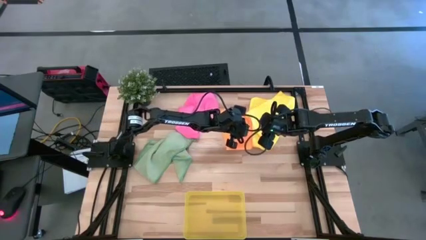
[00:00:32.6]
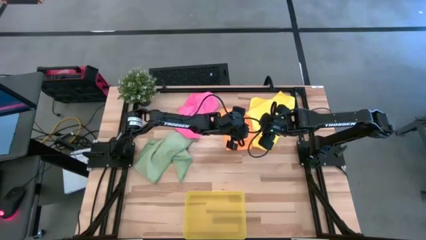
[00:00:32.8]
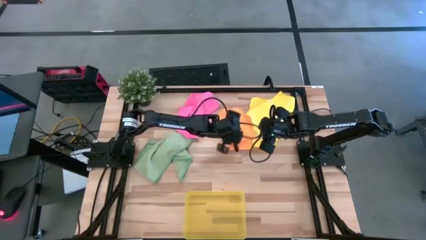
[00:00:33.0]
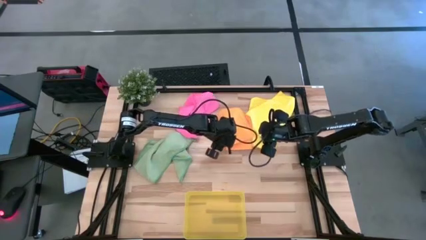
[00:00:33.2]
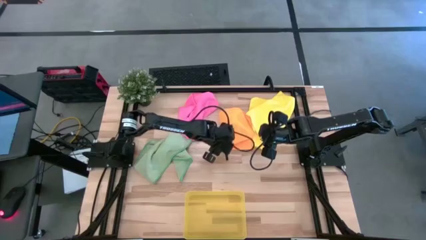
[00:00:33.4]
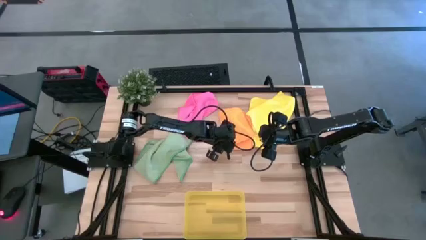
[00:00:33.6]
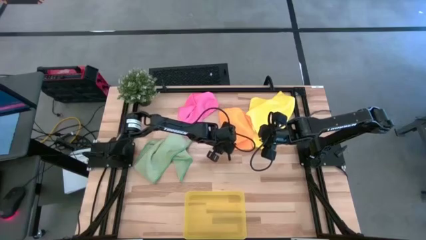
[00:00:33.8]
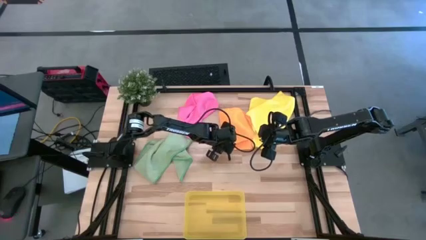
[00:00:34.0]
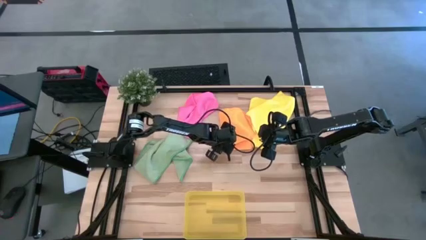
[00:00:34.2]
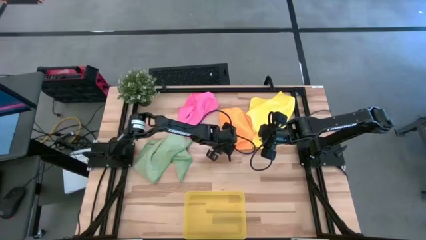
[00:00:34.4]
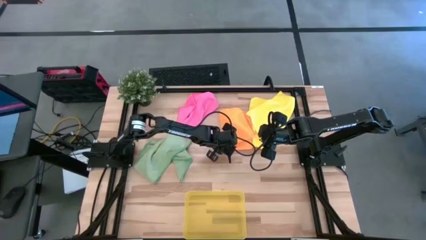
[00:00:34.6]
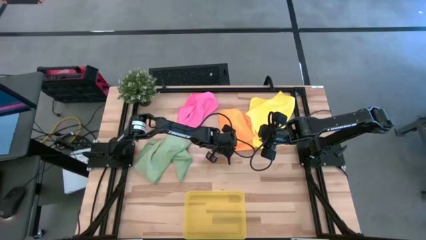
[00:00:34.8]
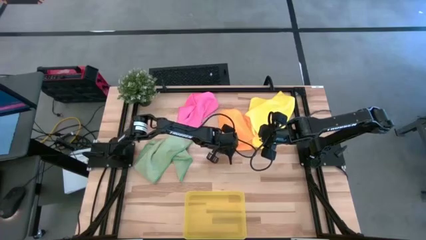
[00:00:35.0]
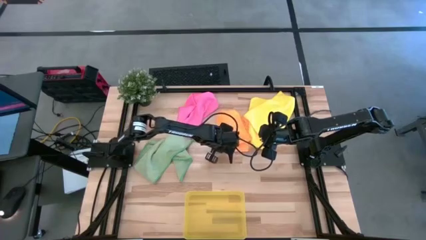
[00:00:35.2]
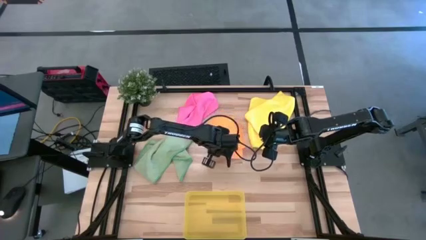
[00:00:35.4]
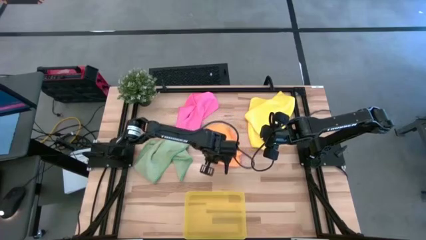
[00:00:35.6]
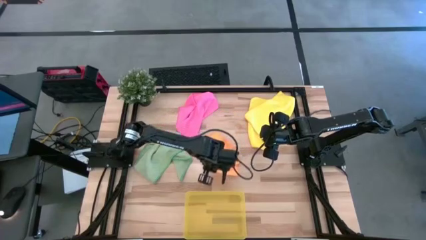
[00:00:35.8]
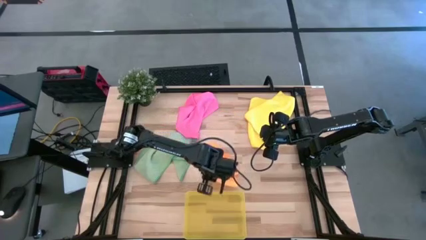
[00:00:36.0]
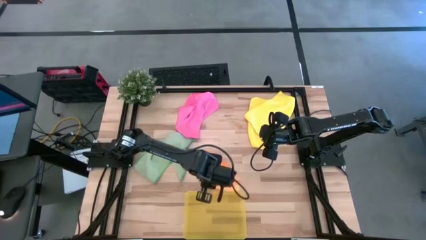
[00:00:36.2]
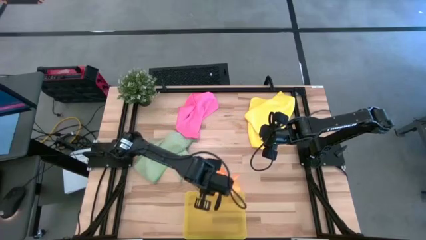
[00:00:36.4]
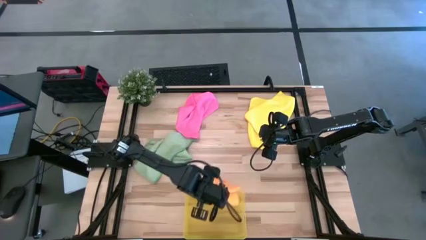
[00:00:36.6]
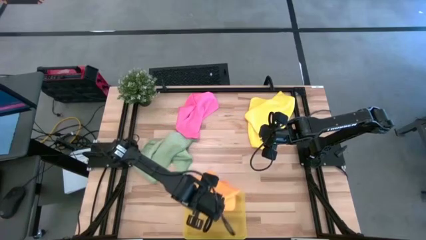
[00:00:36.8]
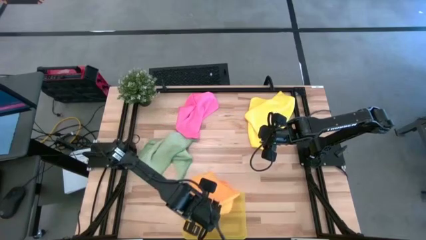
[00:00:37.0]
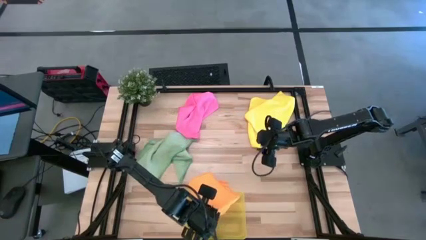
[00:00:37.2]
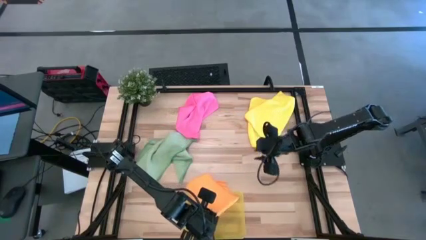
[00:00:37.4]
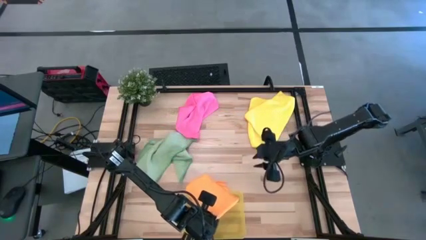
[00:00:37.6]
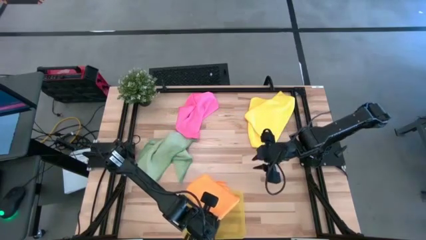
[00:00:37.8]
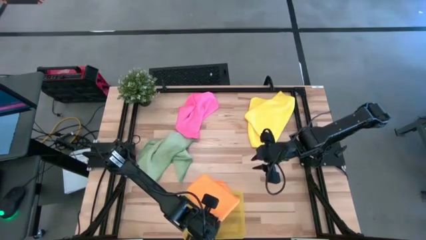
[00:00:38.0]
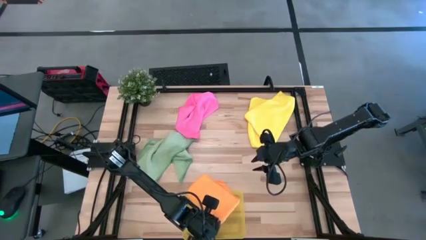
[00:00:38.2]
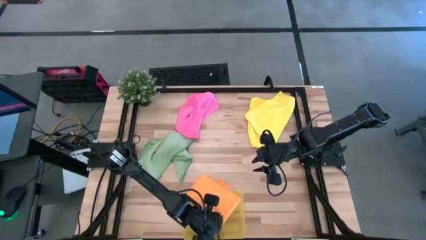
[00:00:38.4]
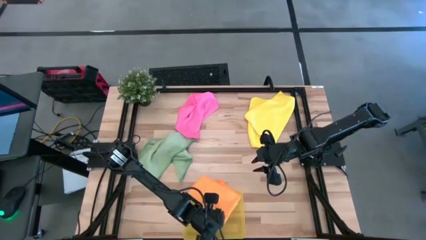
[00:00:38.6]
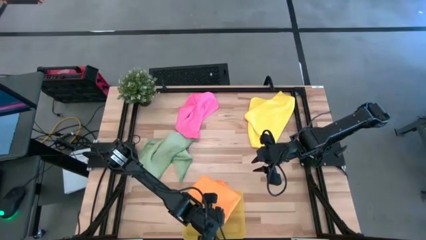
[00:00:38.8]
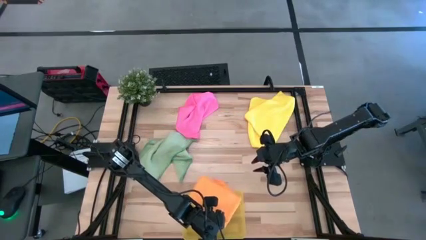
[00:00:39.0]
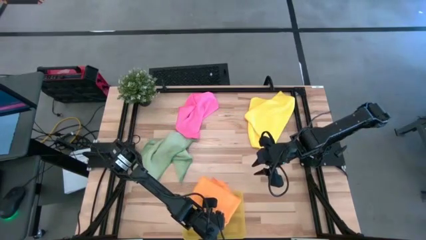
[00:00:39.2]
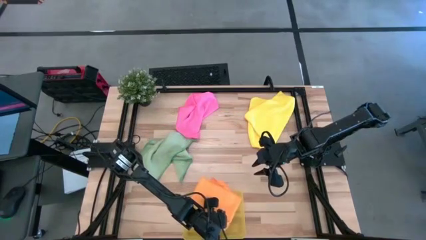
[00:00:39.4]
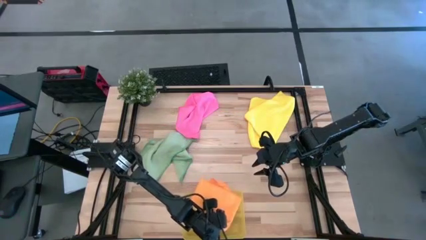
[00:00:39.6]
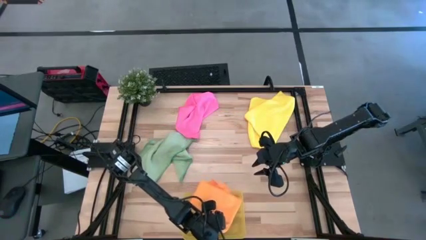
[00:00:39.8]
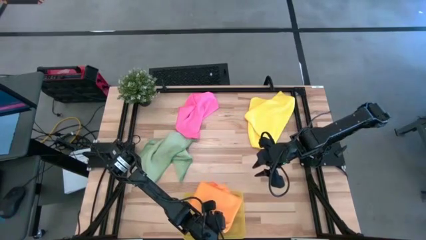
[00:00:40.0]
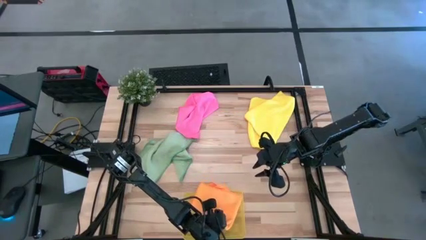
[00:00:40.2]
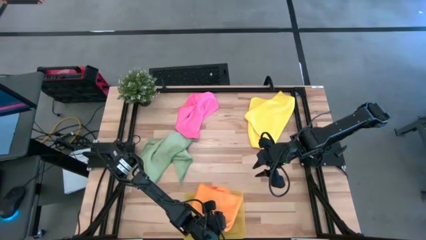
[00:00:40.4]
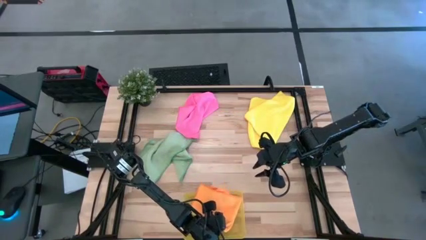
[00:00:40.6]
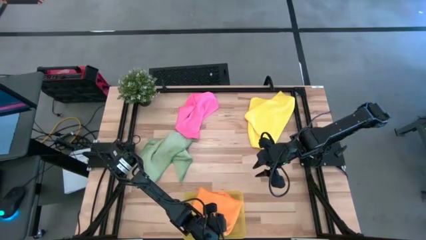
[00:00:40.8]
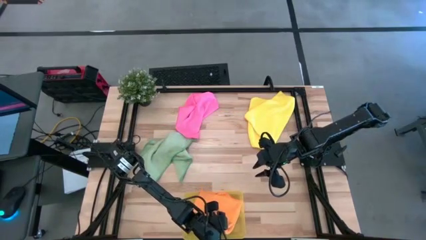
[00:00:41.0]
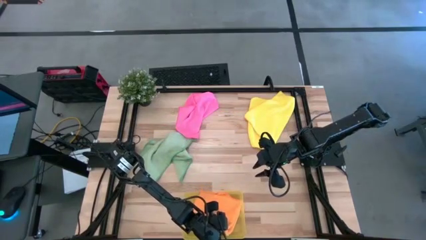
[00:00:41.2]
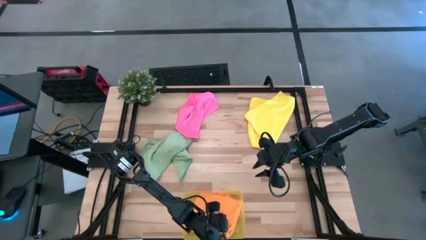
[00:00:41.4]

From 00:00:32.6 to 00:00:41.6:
Task: Fold microfiber towels
Put the orange microfiber cloth into the yellow bin

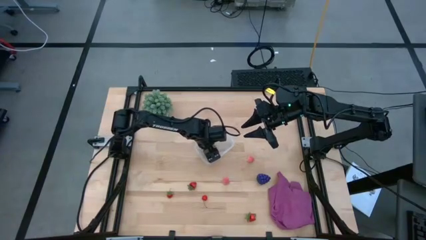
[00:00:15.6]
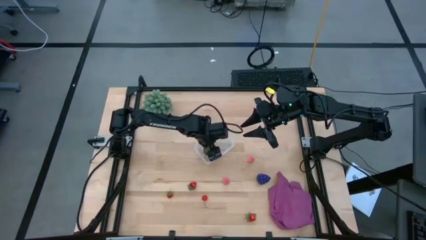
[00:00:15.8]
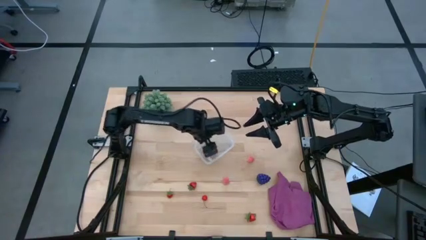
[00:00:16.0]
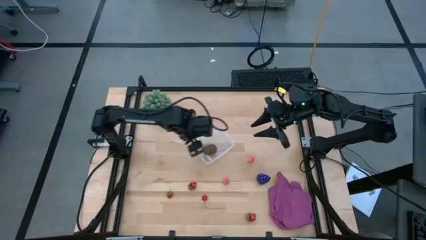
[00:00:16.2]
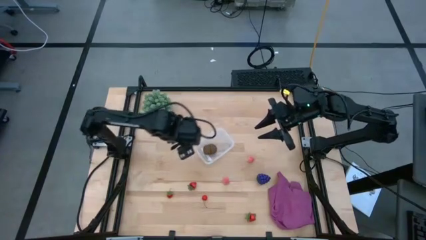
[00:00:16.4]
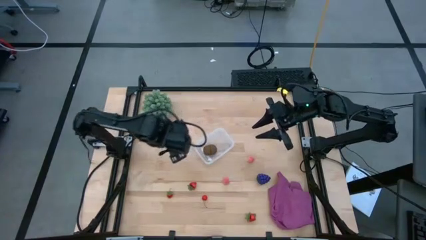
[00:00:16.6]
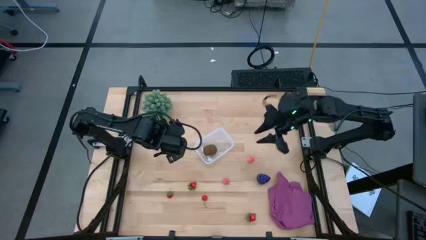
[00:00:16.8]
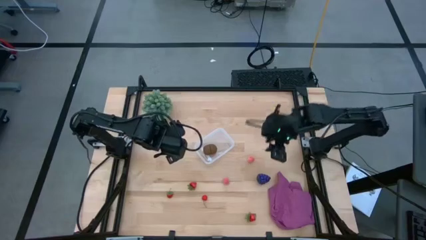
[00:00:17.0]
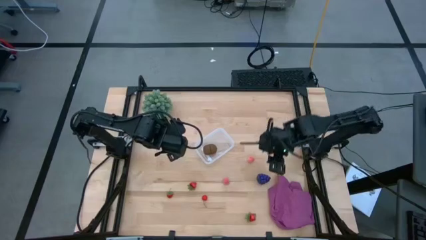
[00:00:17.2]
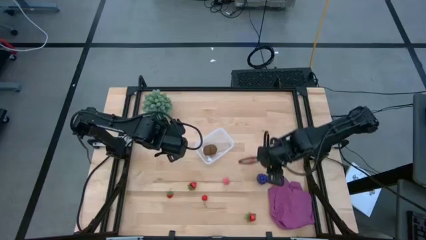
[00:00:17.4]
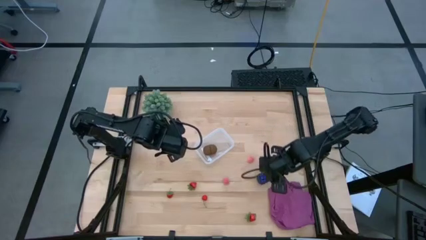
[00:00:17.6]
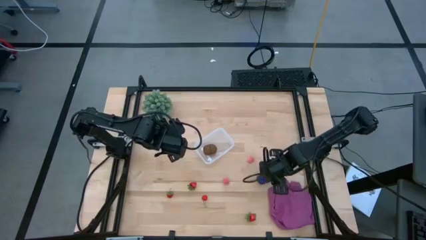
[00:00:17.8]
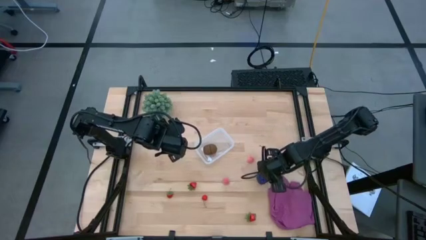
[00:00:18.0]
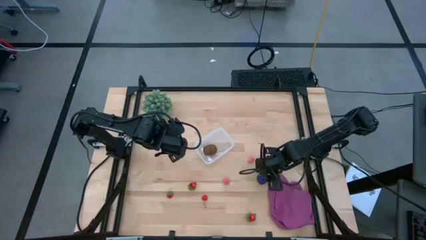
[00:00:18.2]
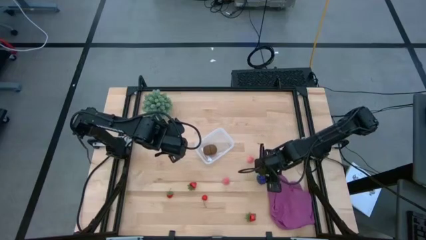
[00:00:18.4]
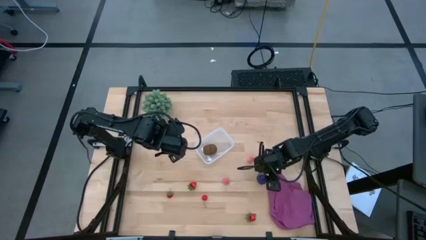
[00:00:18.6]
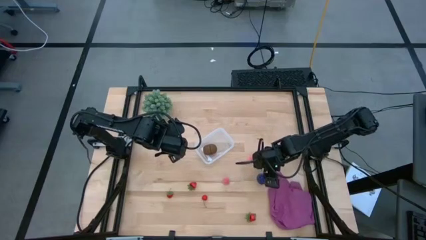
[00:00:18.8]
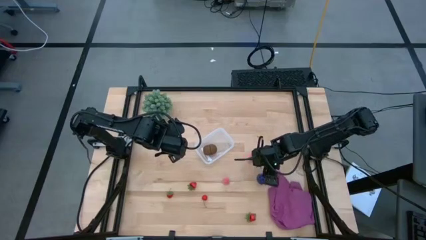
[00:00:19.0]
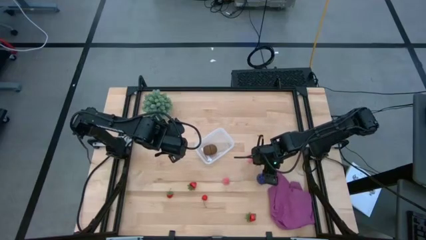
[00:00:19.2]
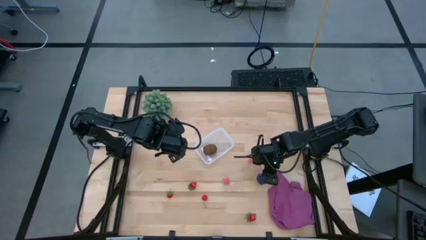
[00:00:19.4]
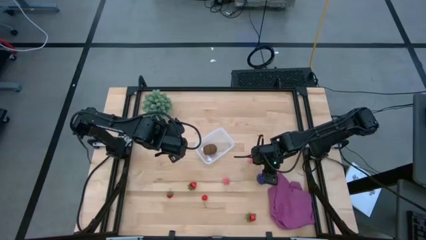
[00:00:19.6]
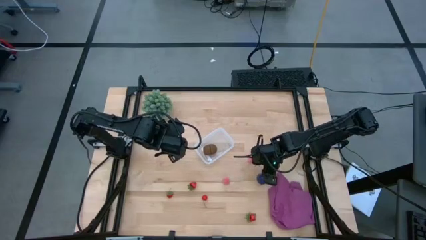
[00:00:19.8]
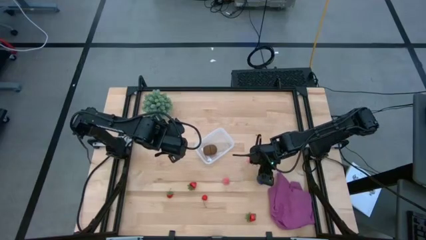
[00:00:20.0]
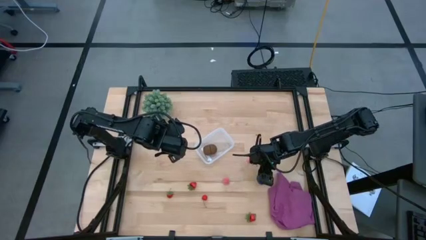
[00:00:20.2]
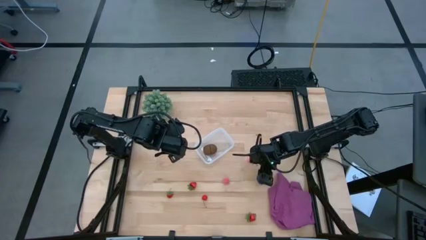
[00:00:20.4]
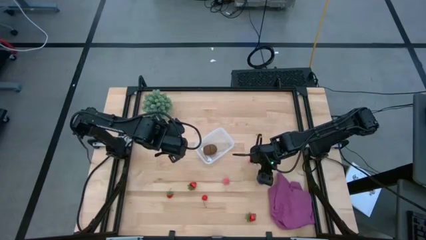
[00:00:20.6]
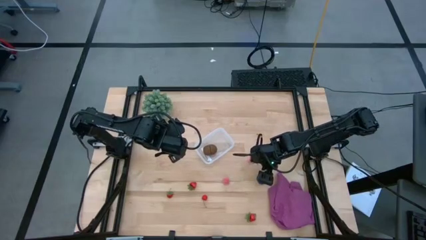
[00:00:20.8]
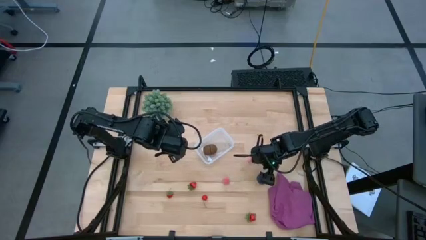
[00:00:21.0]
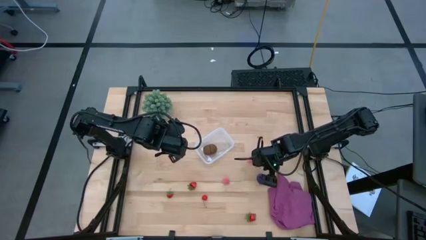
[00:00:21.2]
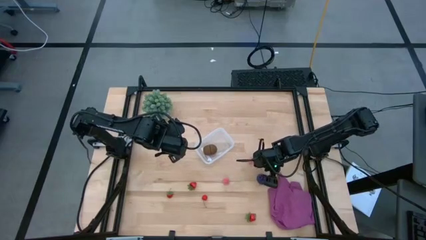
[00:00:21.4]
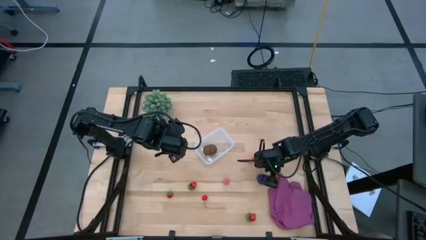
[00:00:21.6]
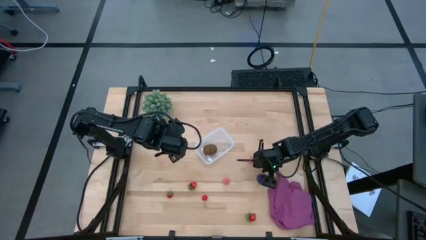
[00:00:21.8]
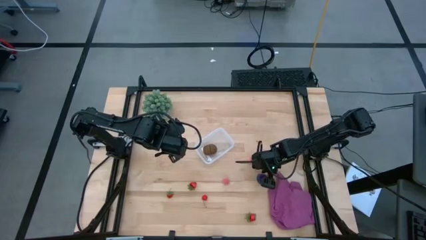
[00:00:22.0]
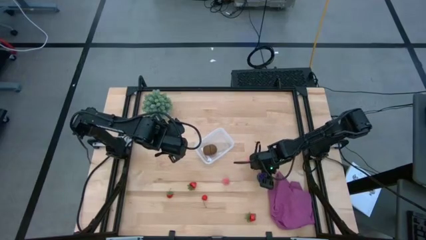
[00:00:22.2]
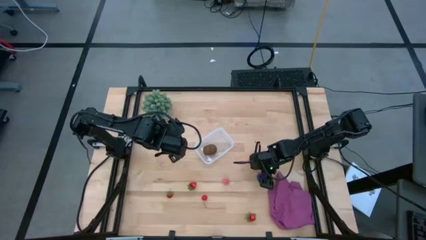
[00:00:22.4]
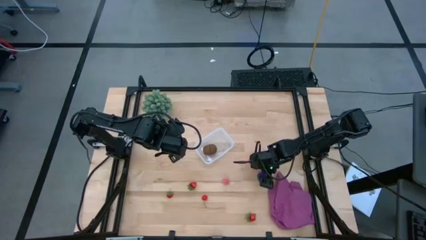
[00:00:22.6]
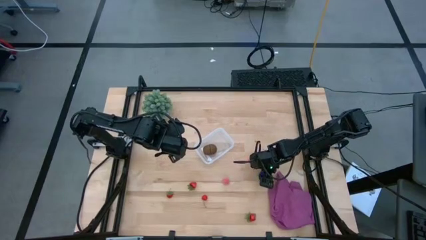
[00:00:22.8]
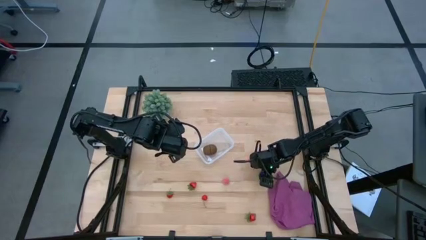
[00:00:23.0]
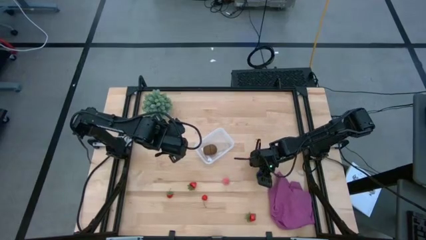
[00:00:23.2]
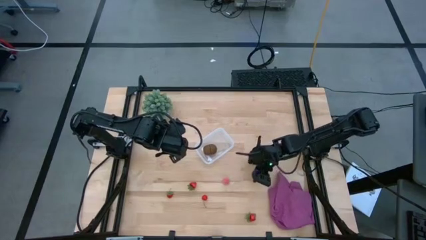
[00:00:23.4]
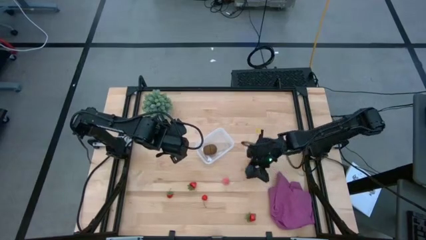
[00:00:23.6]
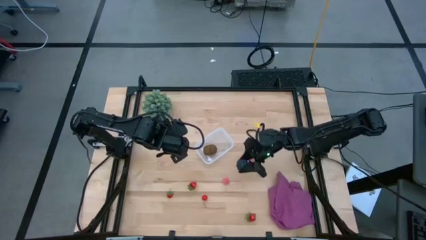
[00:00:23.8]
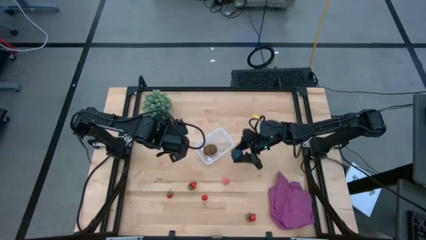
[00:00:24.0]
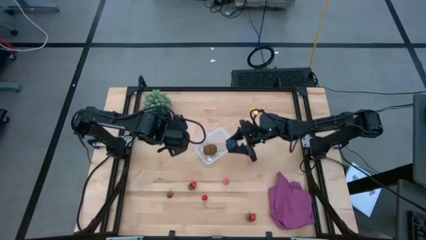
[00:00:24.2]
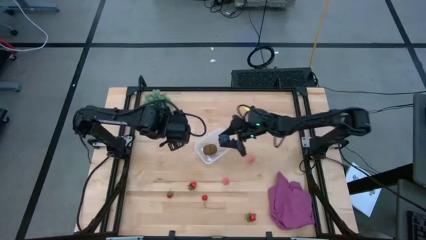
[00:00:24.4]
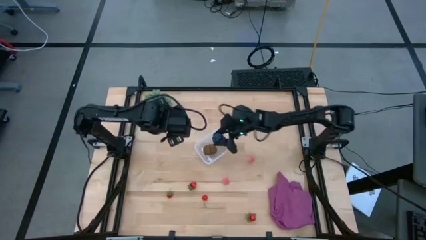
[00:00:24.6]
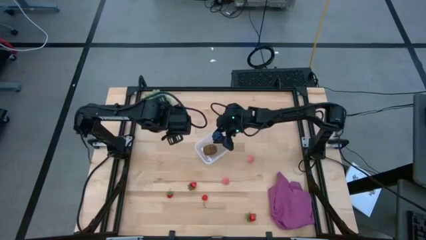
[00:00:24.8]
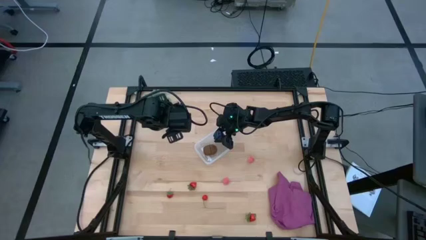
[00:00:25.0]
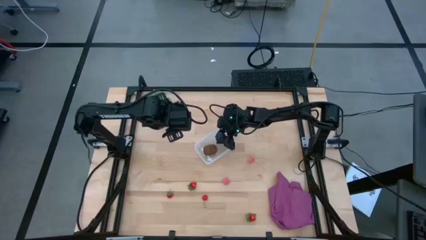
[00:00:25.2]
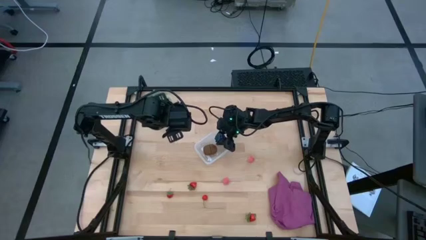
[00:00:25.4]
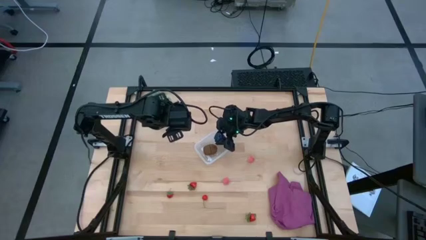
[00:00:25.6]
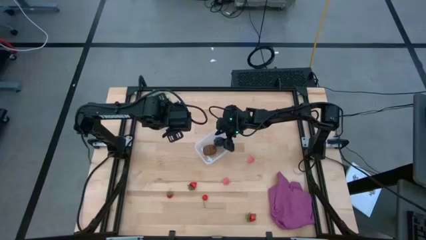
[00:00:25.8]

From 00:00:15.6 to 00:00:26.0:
Task: Pick and placing Produce into tupperware
Put the grapes into the transparent bin
